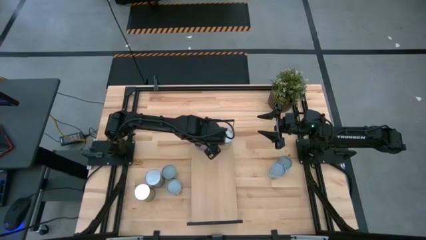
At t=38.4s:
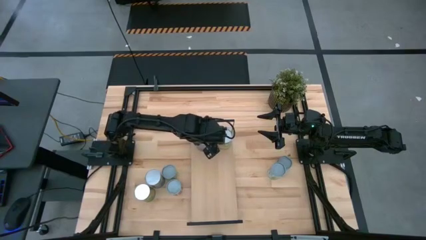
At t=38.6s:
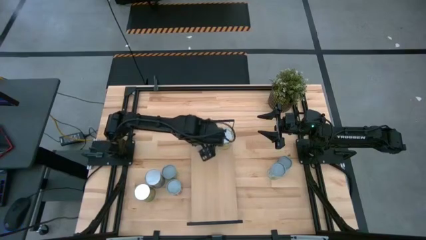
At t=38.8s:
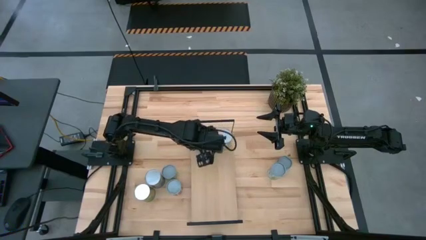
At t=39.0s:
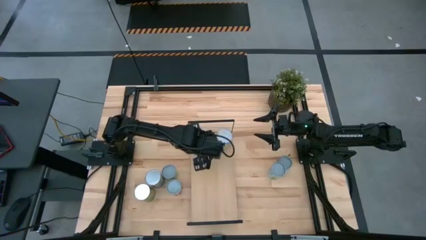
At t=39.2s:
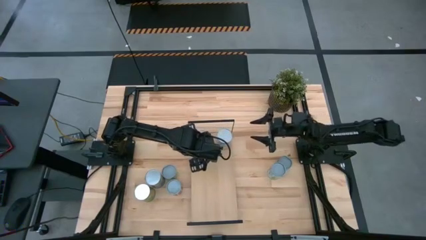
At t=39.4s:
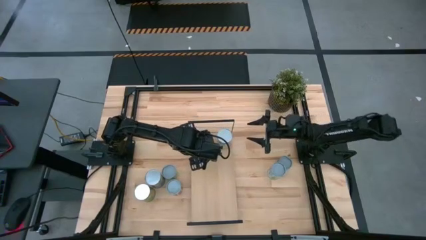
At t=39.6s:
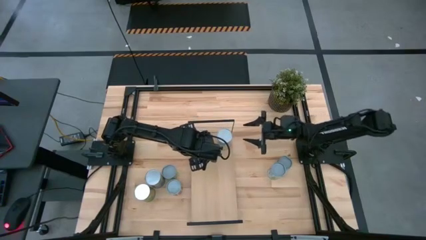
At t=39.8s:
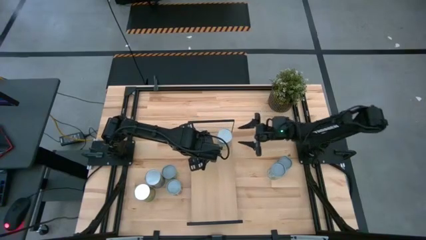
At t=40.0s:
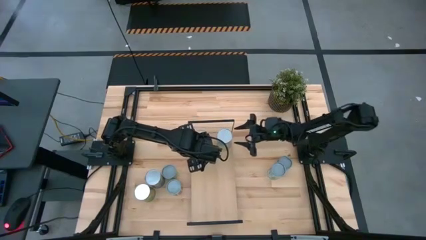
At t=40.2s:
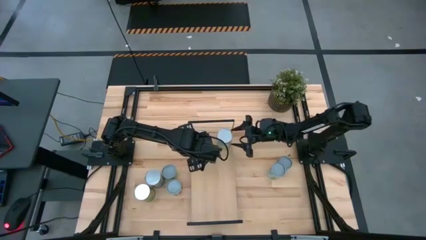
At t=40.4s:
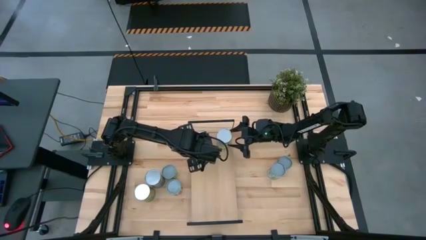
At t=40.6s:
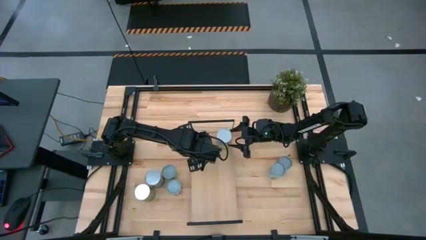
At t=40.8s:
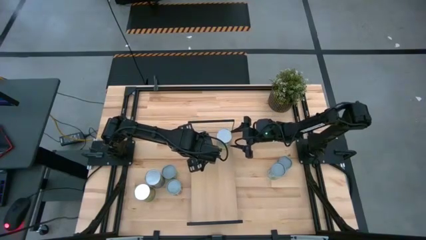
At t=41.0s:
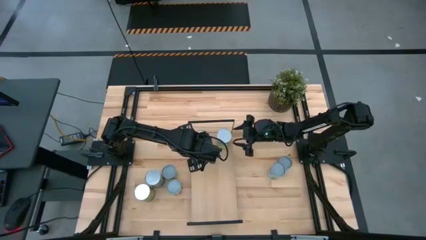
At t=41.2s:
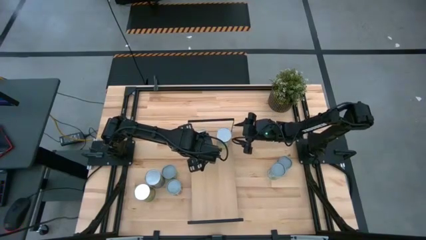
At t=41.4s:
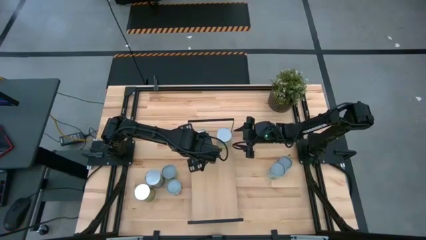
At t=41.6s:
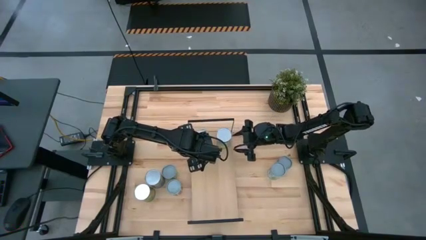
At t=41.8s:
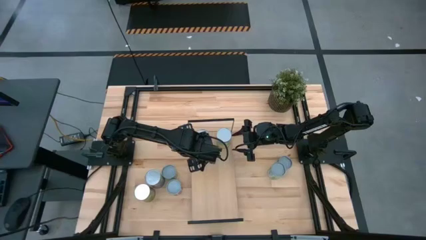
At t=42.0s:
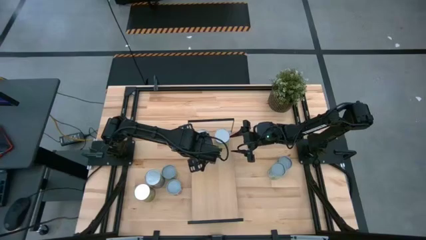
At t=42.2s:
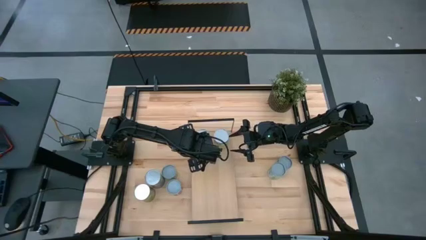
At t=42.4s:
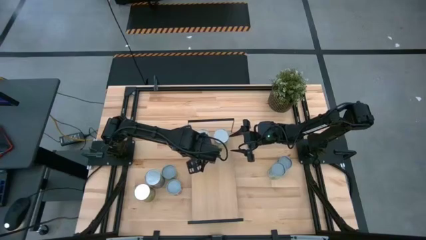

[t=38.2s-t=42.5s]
Task: Pick and place cans onto a shelf
Adjust the large canned carrots on the shelf

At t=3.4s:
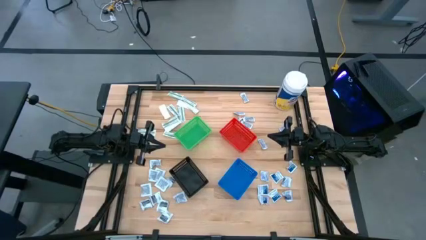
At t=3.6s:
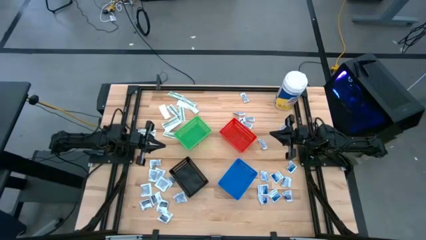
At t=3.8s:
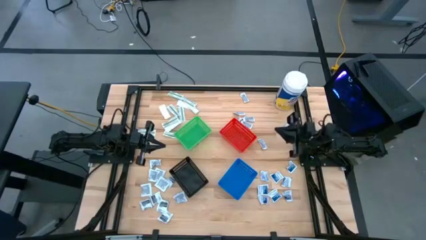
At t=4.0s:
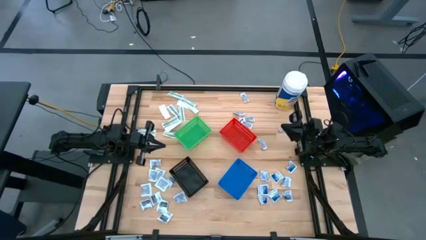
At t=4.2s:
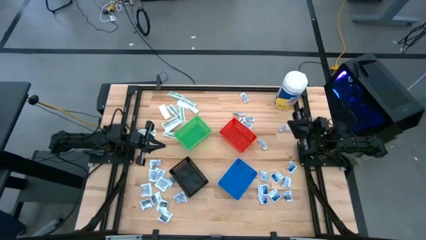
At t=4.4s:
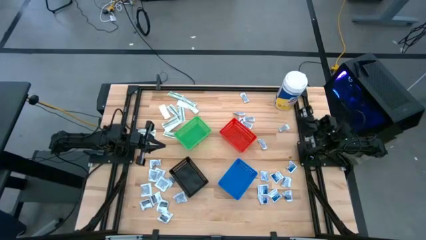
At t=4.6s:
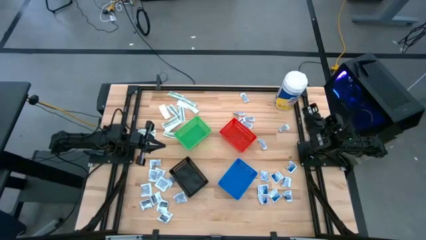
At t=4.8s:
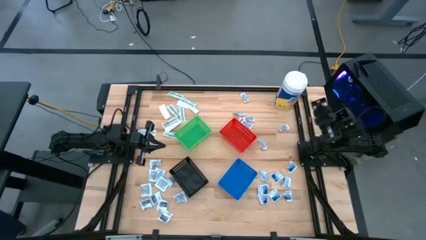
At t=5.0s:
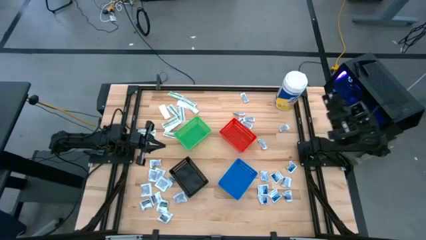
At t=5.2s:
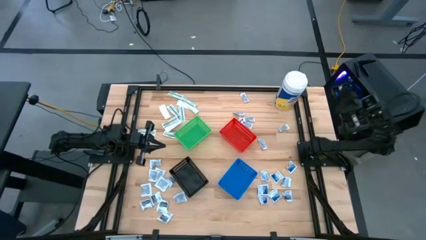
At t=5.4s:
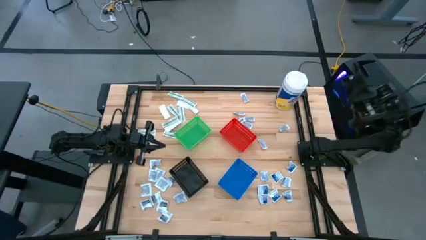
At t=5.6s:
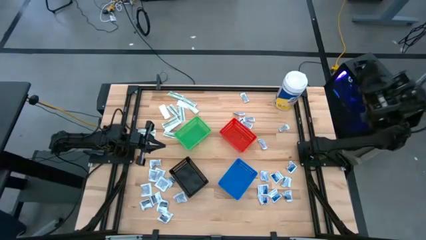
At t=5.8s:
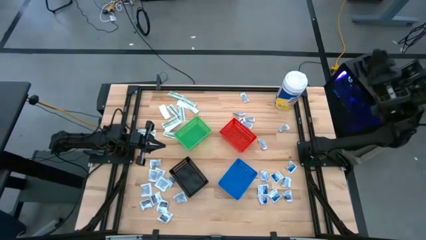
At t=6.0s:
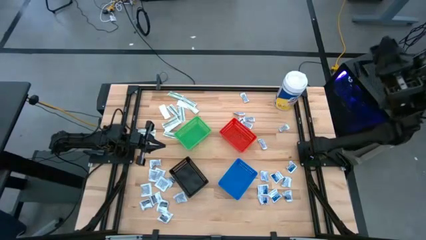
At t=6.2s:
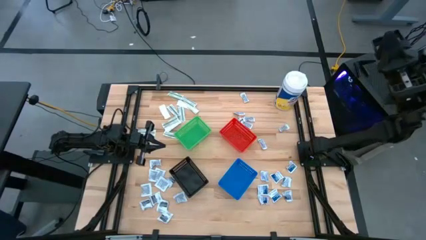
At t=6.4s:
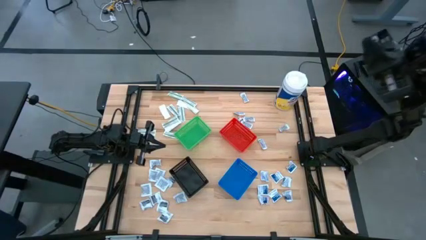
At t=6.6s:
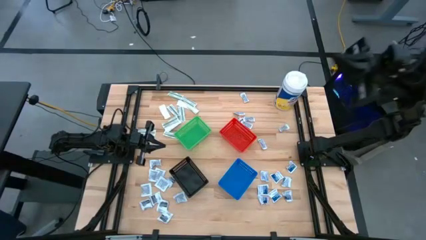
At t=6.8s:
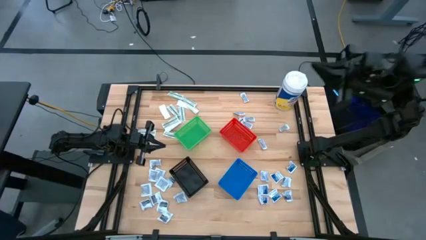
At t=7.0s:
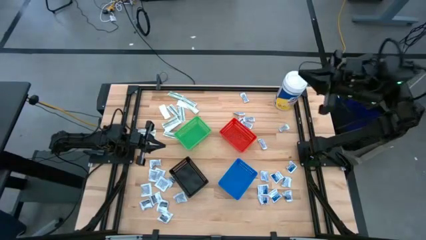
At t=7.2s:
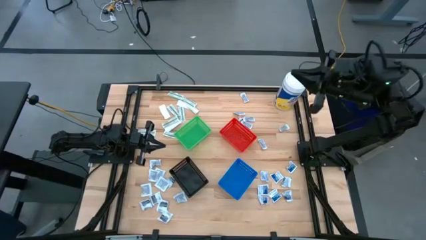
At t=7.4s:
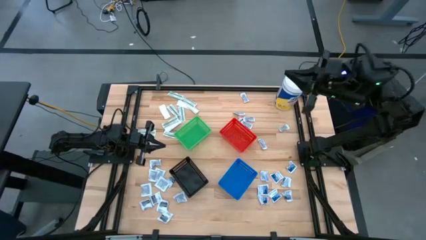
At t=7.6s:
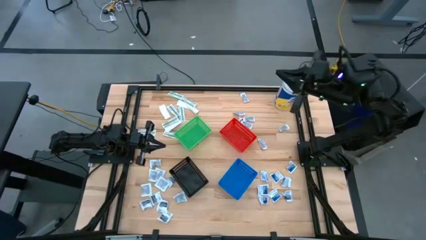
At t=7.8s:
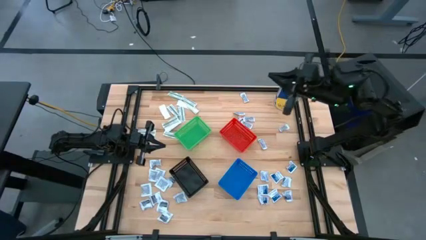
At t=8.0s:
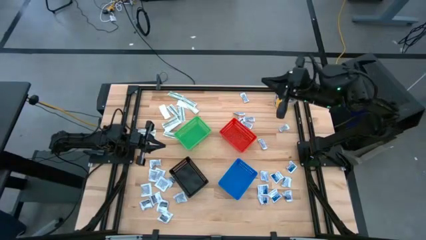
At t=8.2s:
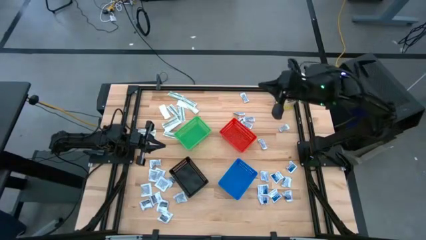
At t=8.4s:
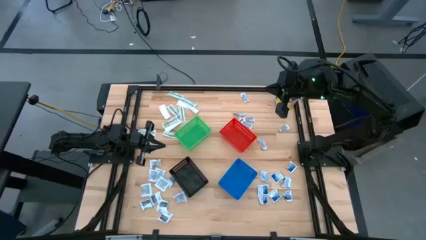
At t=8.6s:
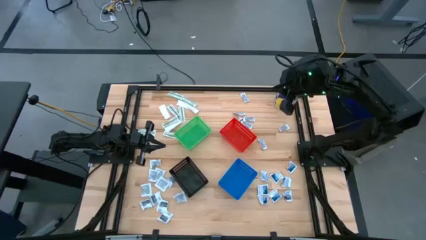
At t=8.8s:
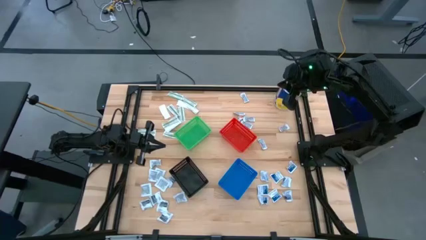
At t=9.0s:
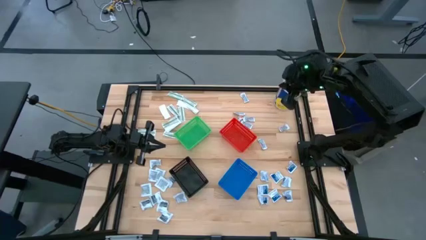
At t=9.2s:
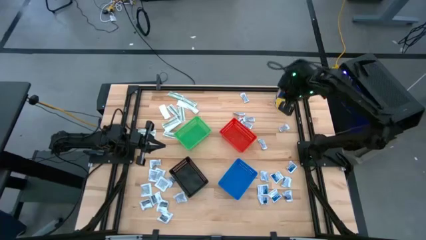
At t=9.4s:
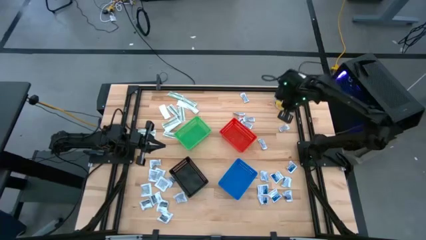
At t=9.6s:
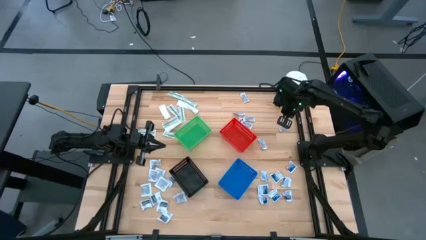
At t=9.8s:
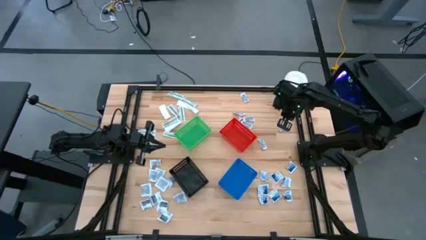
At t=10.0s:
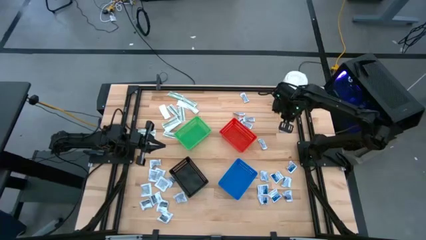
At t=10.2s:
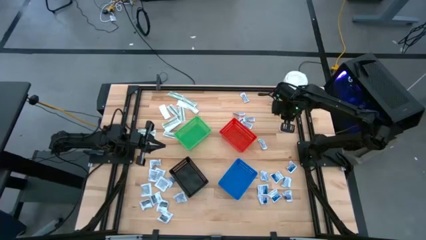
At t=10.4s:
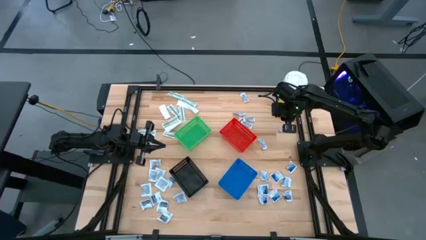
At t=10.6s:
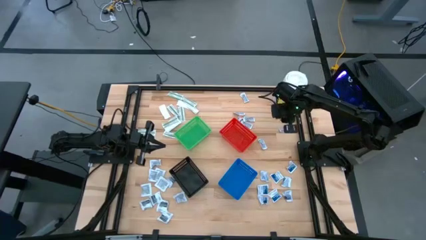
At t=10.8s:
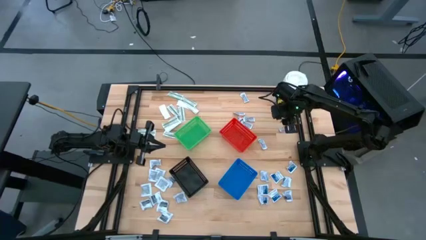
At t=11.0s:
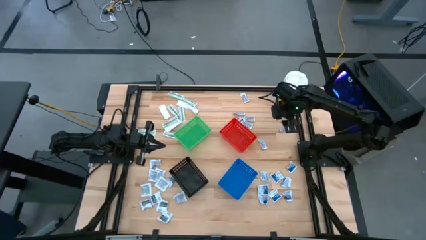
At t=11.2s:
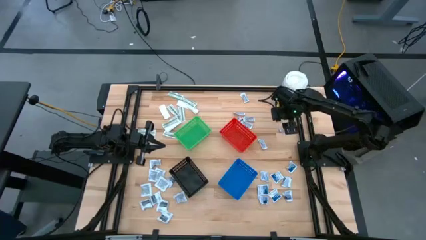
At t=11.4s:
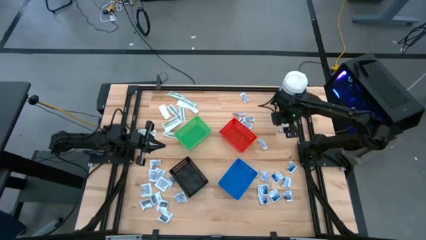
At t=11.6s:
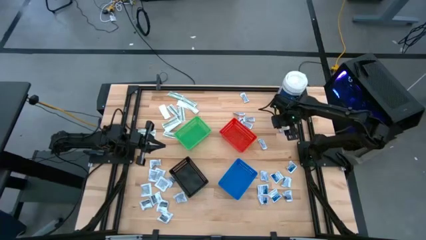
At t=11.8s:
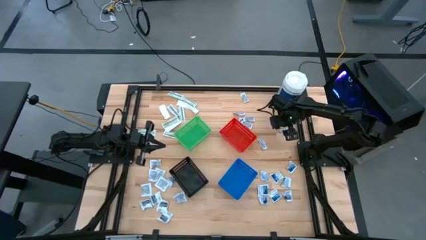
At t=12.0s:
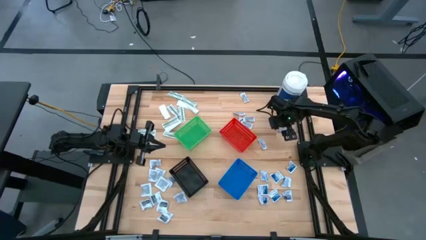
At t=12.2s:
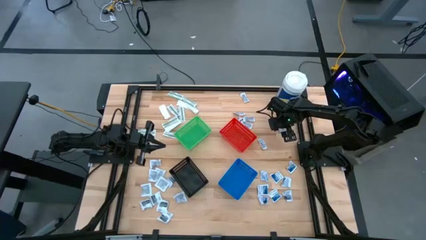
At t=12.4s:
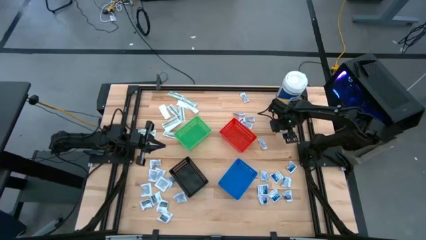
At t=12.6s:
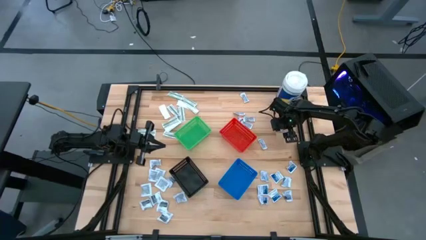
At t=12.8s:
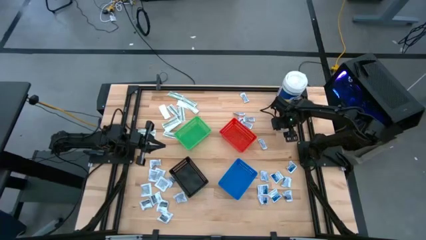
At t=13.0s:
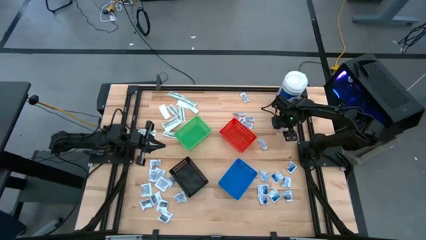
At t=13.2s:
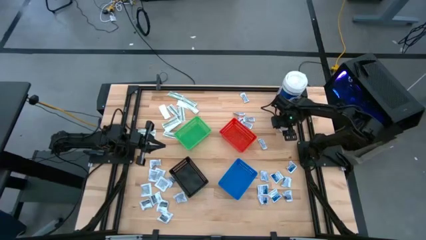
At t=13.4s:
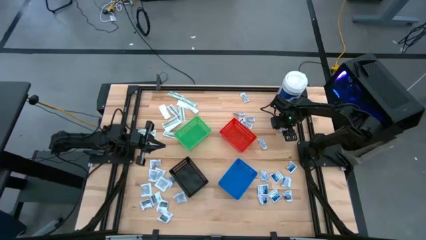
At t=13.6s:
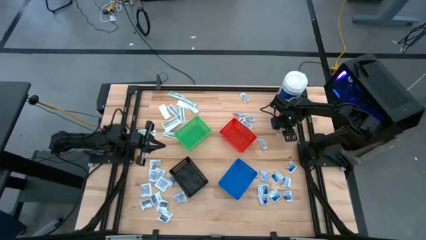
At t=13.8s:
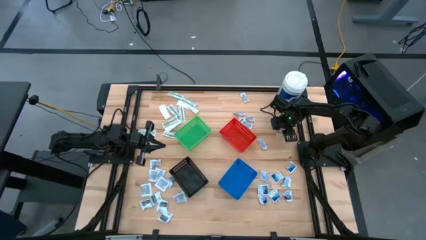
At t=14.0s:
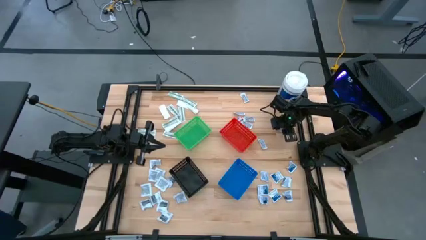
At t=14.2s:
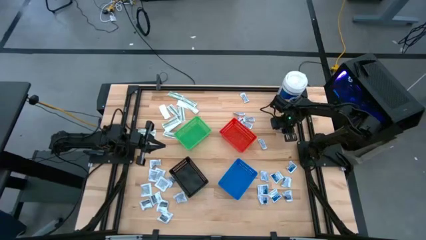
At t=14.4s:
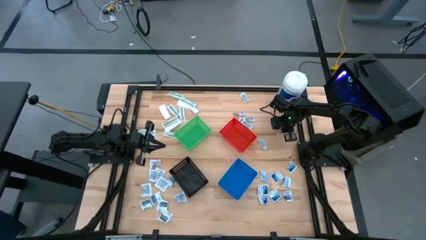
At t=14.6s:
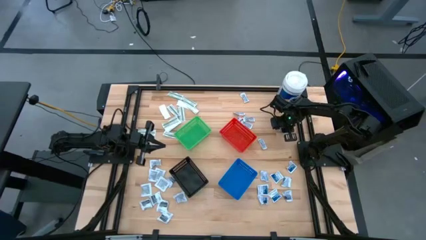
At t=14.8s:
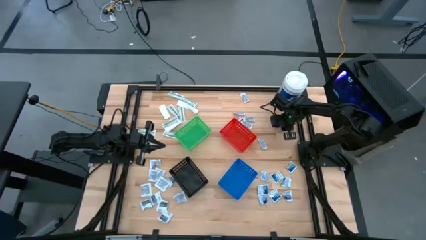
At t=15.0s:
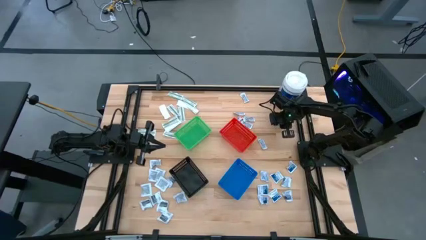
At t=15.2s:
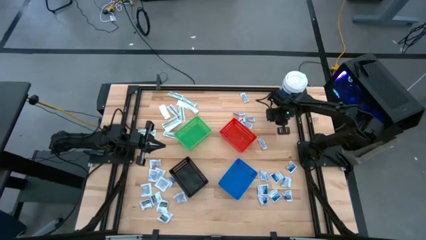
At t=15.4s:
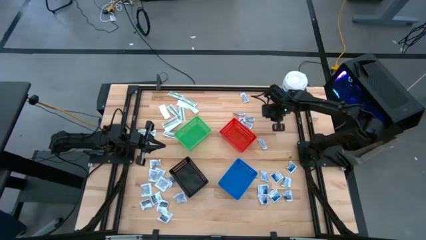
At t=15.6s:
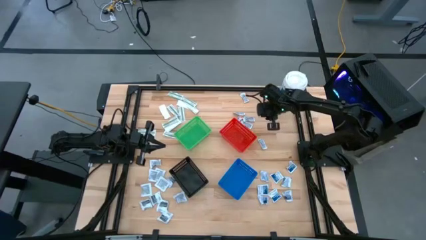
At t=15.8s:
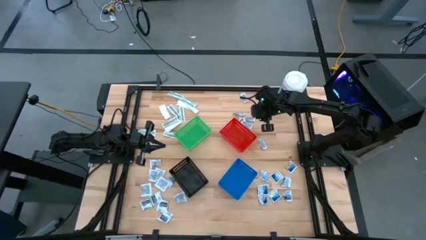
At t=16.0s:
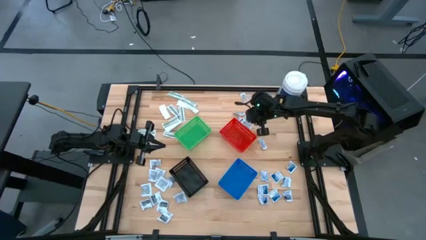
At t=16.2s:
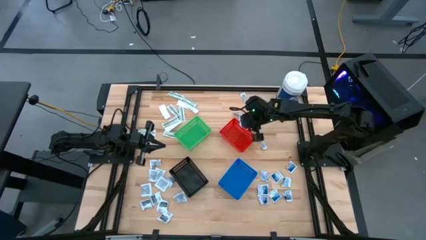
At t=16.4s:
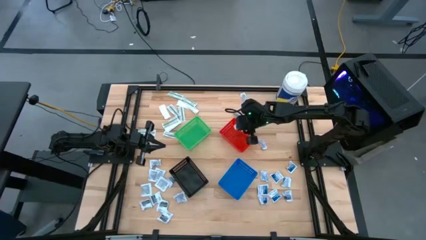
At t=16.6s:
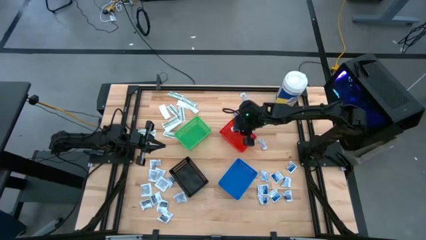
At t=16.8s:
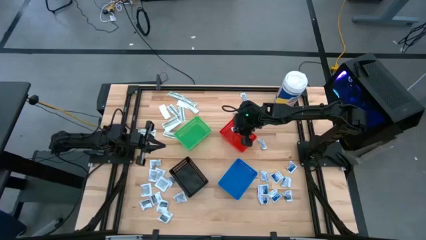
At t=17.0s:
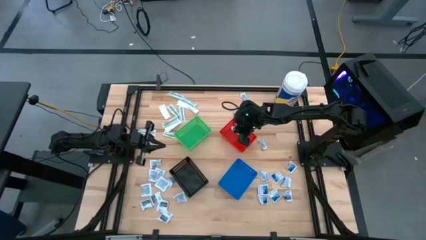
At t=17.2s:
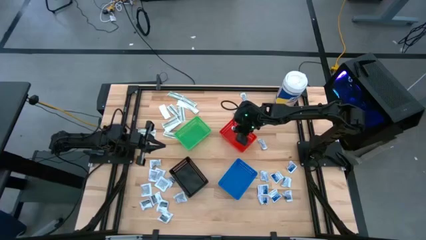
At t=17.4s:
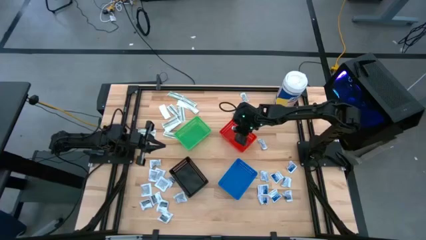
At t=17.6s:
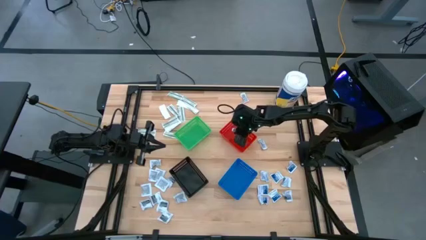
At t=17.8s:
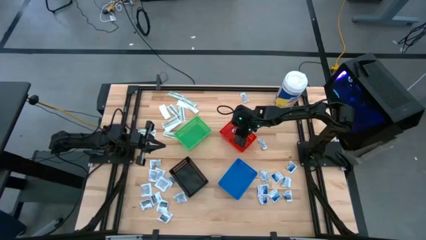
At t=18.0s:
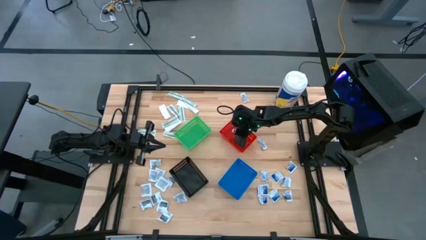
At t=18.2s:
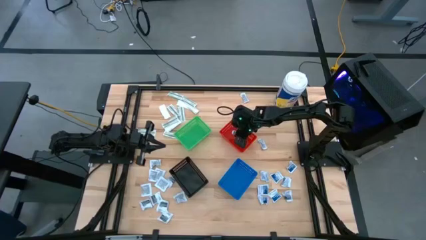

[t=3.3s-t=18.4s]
Task: Pick & Place First Aid Supplies
Put the orange ointment pack into the red bin
